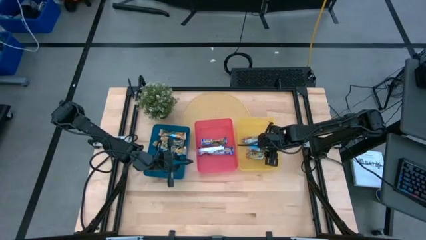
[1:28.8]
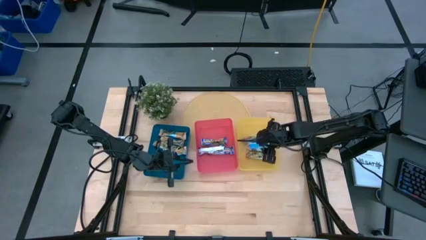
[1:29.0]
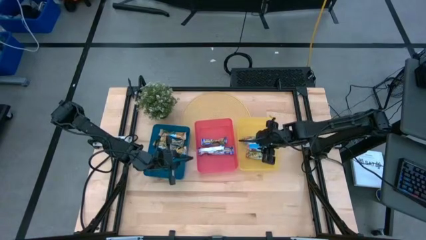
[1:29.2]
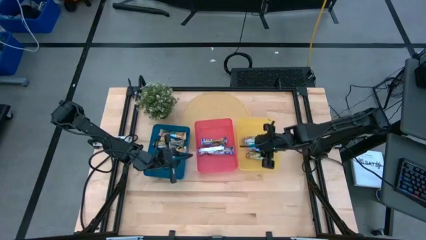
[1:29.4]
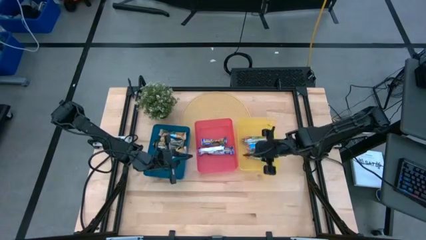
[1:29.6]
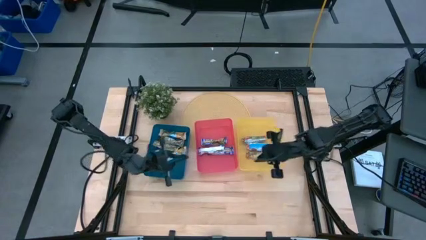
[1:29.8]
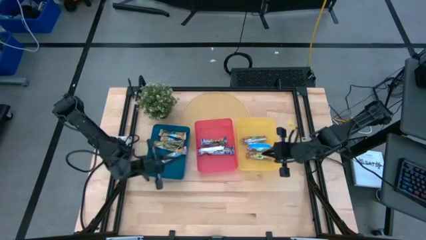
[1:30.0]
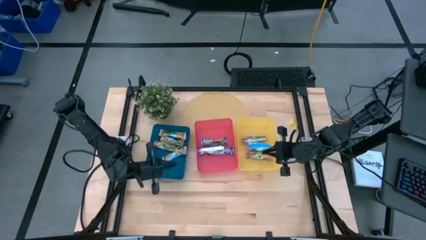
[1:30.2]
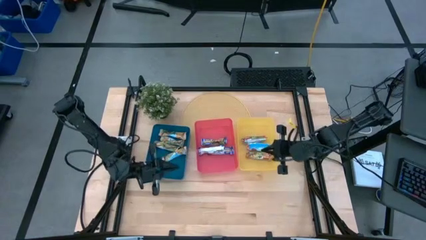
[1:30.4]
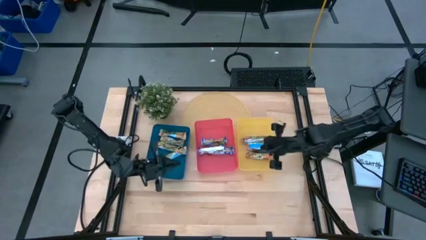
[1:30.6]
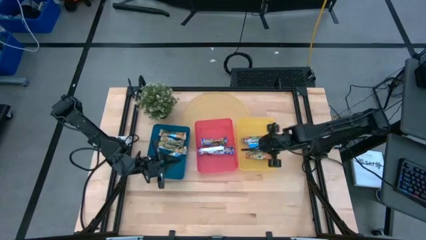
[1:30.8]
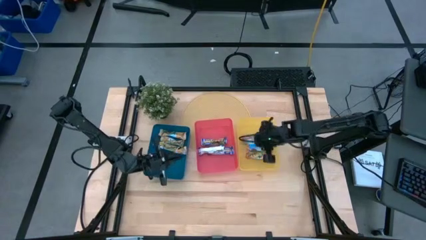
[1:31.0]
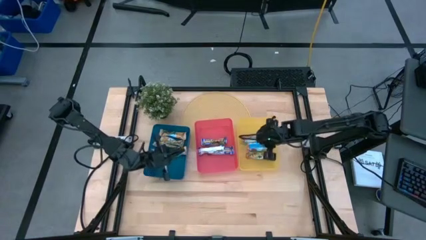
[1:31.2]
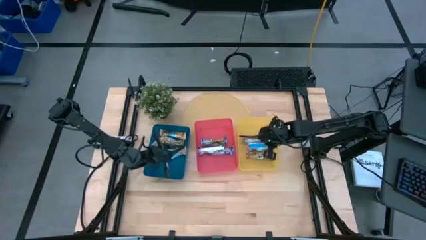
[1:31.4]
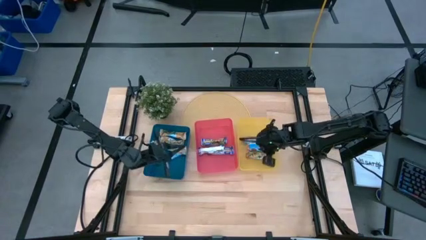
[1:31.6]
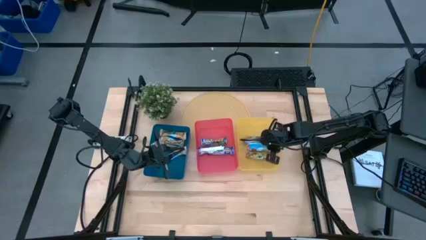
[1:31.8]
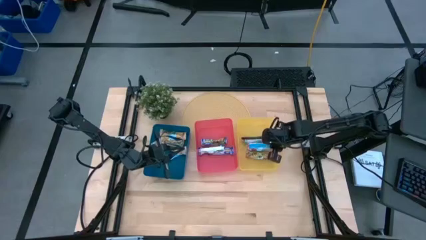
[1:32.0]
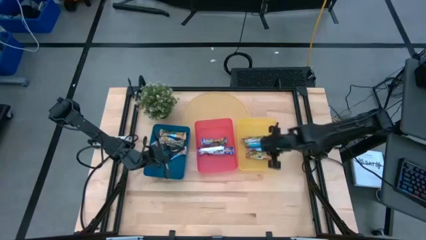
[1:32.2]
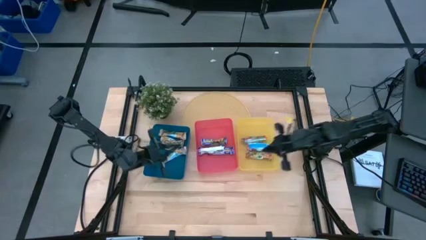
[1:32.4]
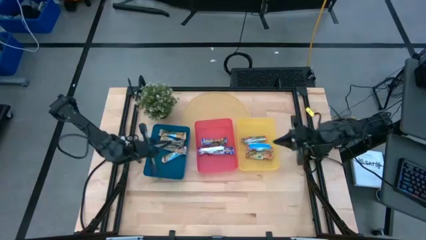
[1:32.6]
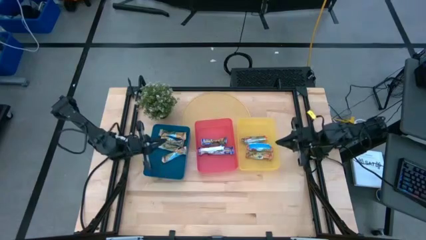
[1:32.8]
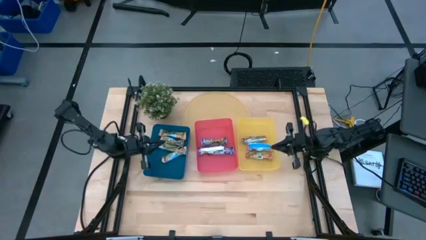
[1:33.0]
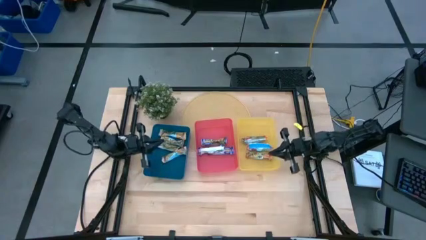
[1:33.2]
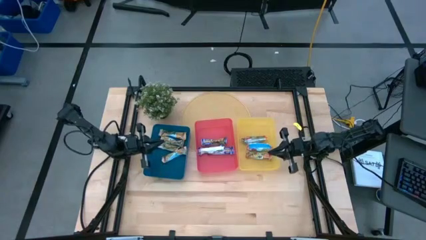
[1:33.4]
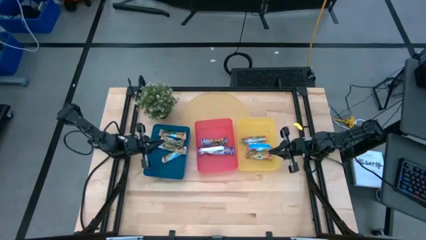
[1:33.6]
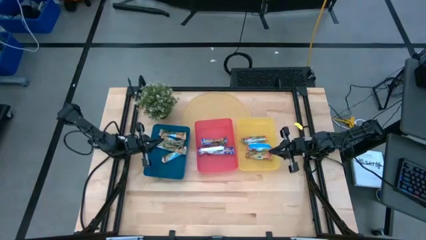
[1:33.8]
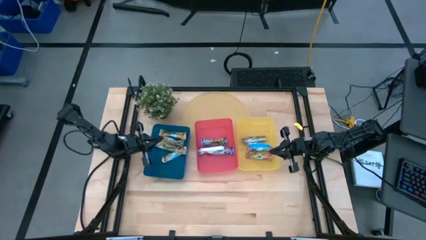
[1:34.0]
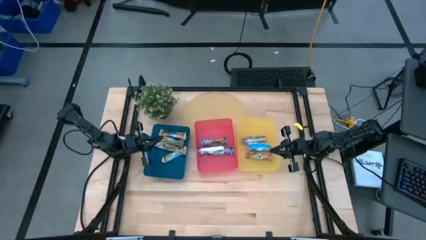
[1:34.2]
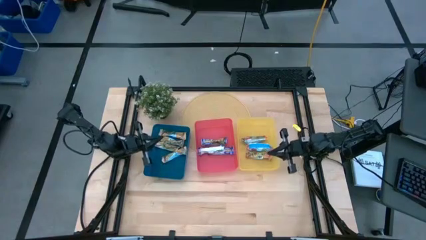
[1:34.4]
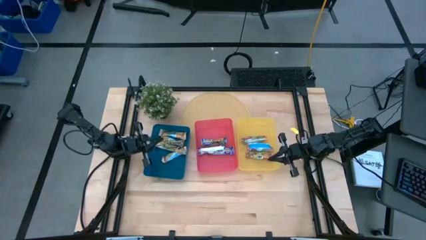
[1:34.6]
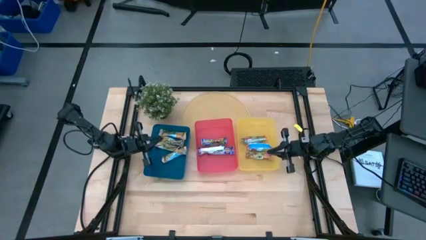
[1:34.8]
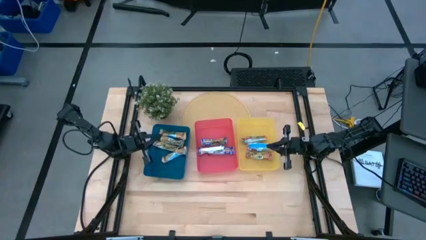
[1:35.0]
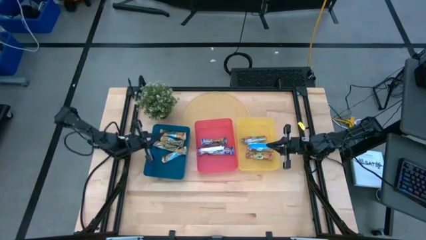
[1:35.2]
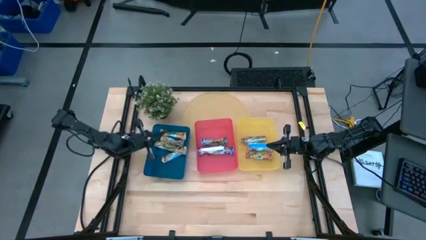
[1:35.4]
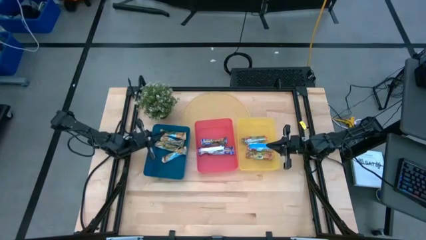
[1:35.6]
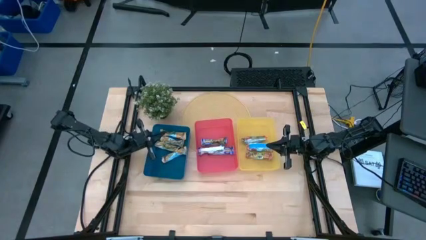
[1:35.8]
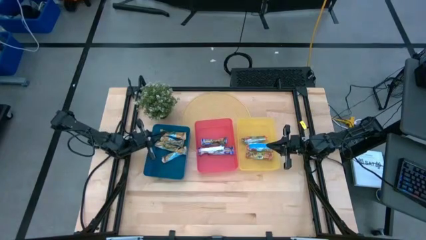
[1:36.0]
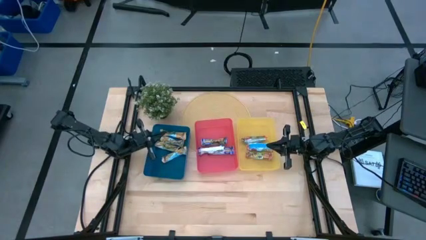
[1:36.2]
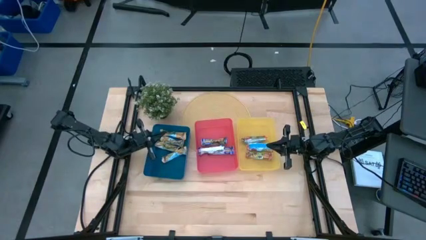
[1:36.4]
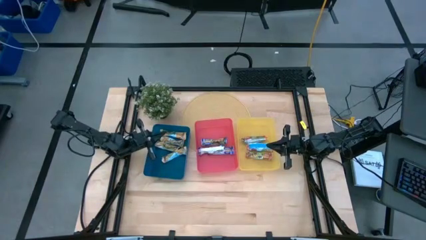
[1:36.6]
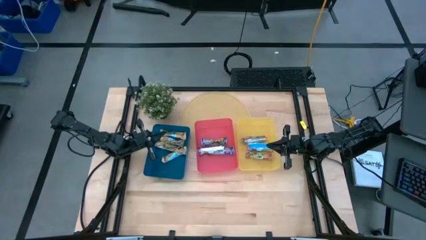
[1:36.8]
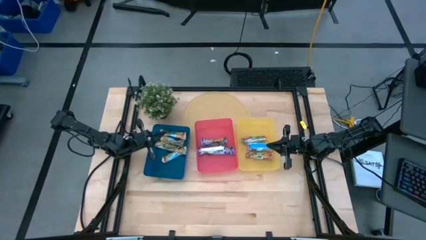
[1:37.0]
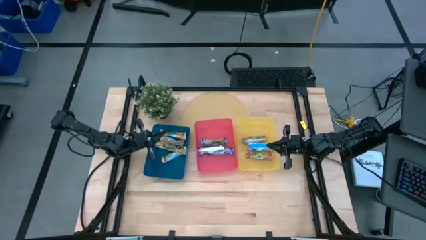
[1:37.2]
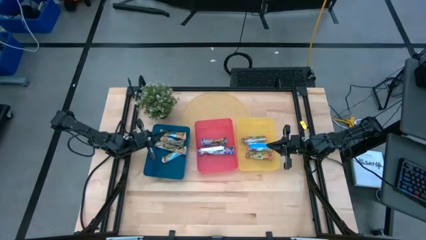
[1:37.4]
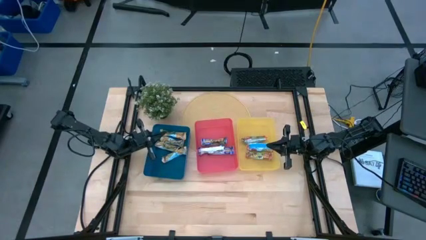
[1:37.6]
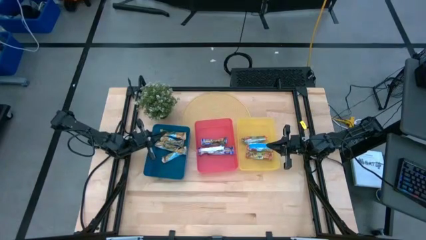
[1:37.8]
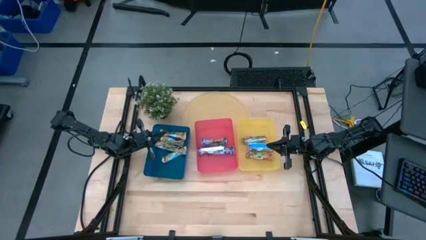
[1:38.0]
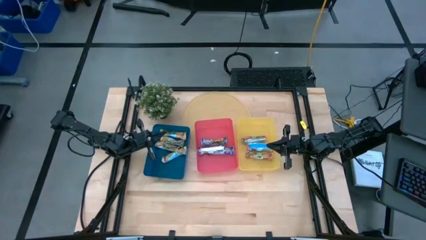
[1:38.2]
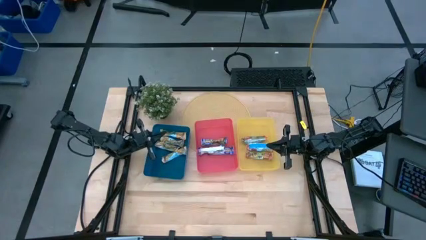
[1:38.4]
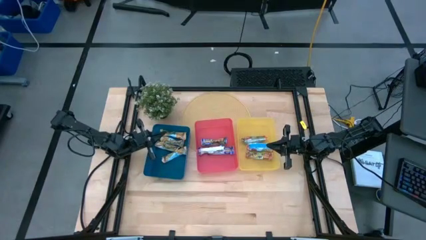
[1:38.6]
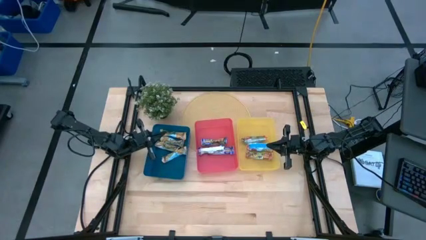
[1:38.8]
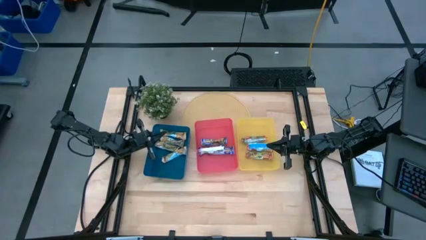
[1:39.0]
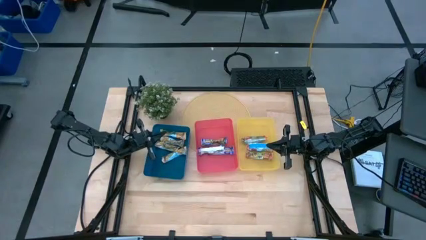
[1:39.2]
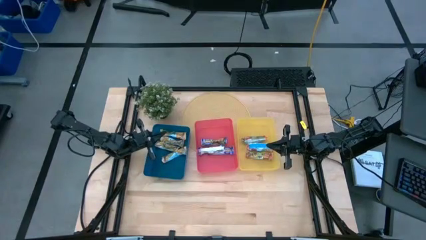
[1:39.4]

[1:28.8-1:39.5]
Task: Pick and place Granola Bars by type
Return to Home Position

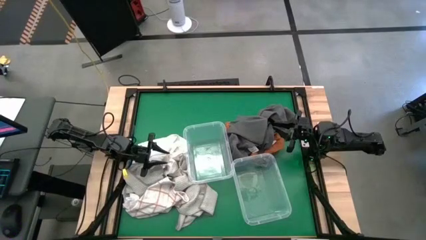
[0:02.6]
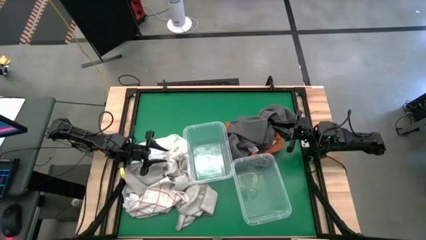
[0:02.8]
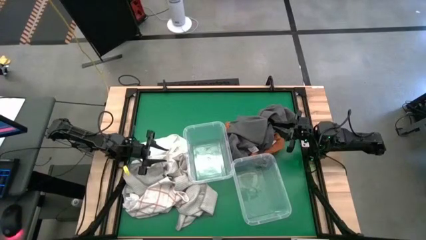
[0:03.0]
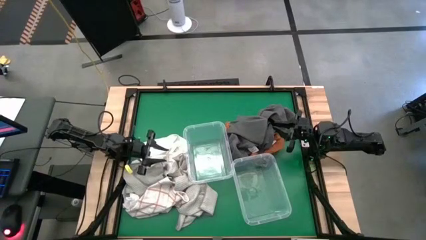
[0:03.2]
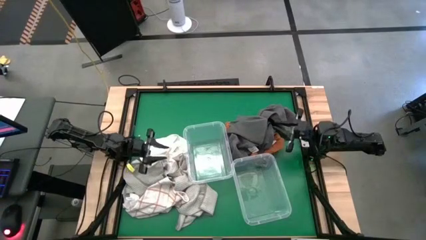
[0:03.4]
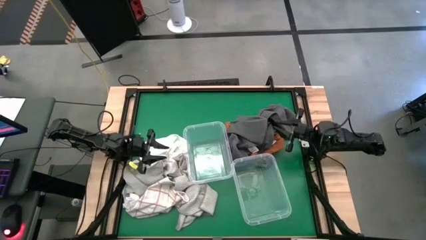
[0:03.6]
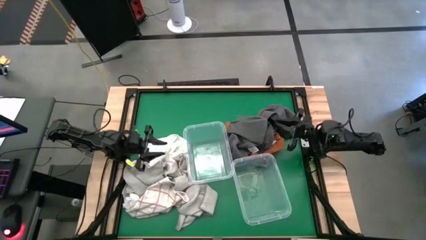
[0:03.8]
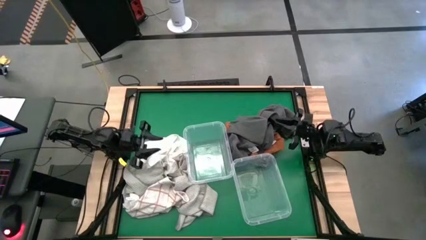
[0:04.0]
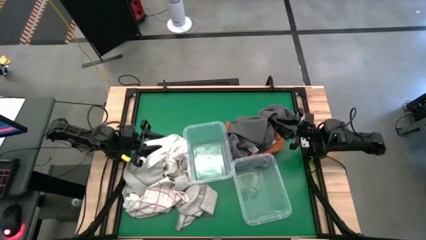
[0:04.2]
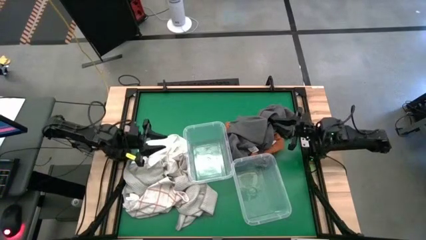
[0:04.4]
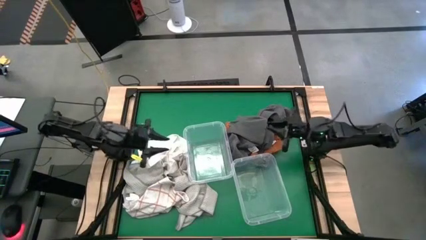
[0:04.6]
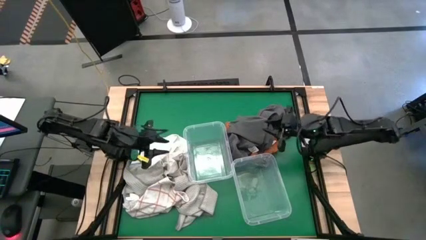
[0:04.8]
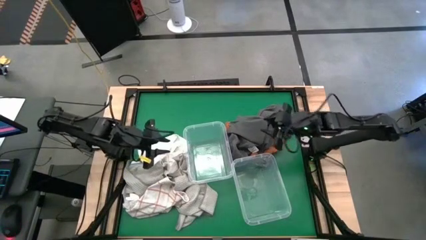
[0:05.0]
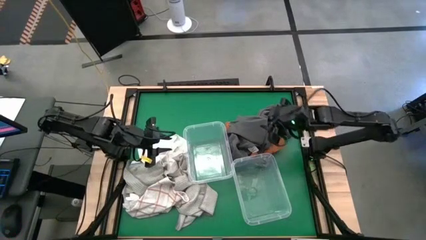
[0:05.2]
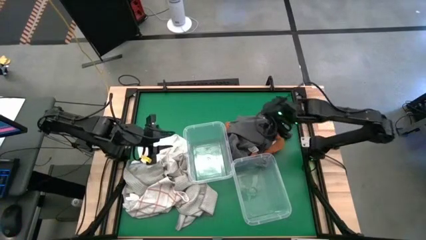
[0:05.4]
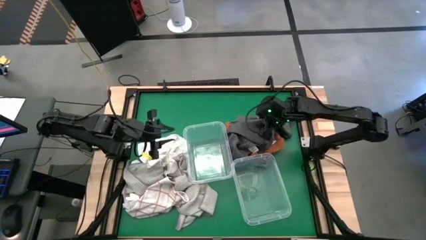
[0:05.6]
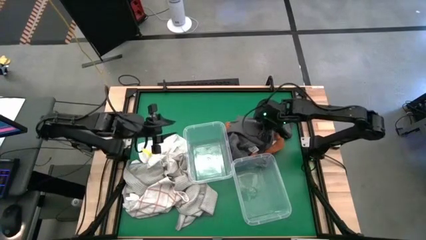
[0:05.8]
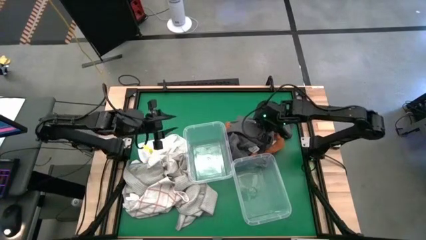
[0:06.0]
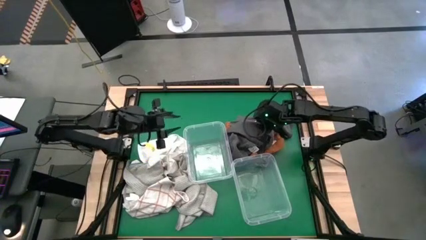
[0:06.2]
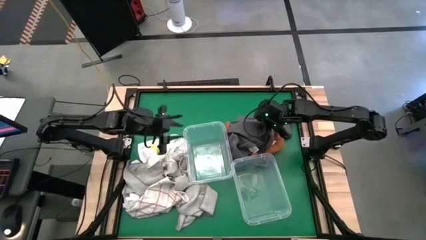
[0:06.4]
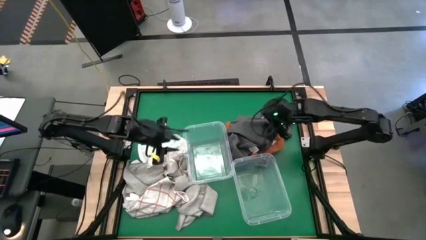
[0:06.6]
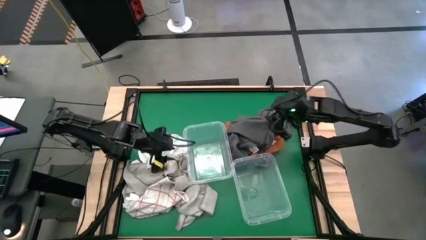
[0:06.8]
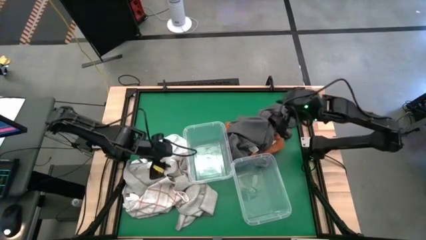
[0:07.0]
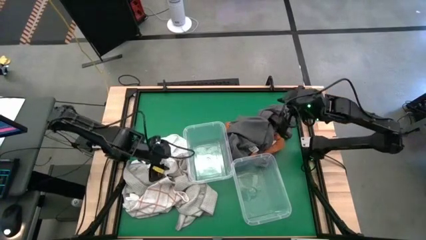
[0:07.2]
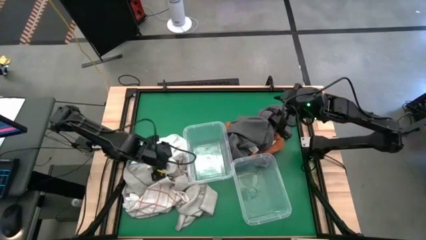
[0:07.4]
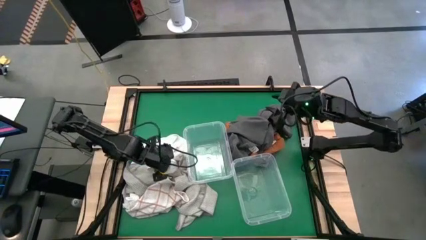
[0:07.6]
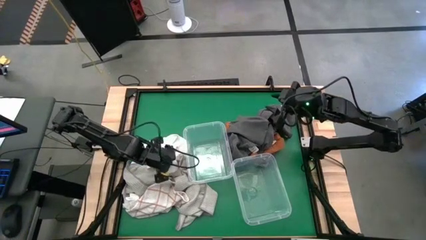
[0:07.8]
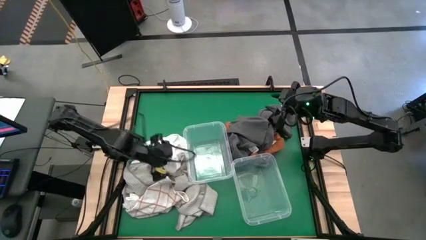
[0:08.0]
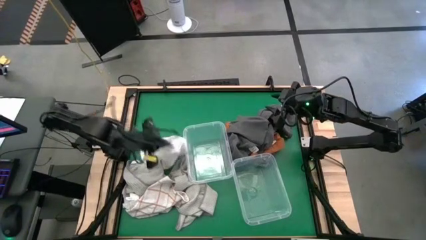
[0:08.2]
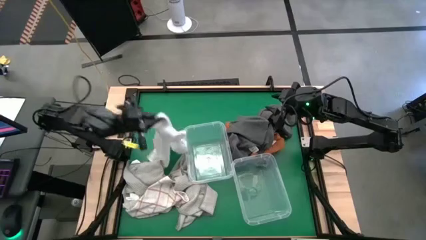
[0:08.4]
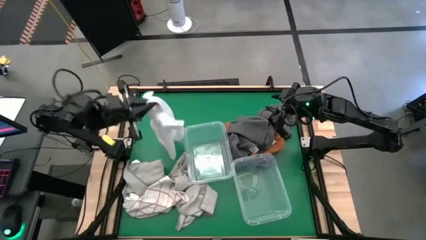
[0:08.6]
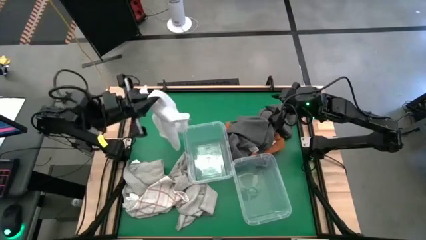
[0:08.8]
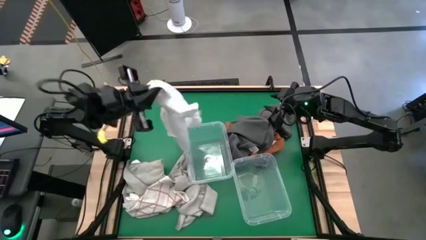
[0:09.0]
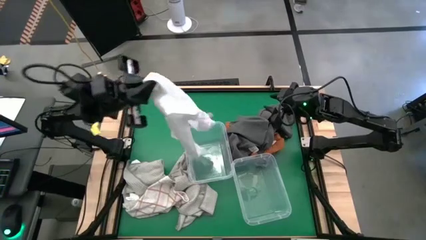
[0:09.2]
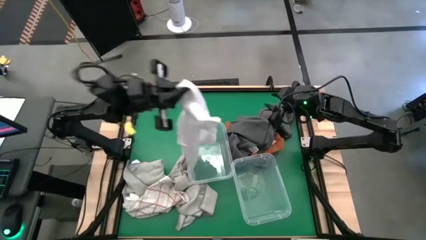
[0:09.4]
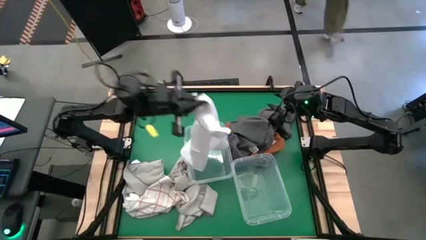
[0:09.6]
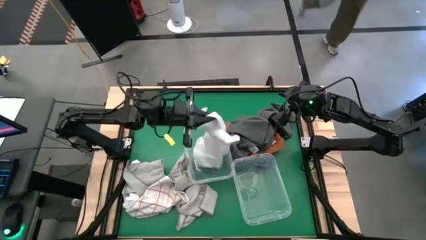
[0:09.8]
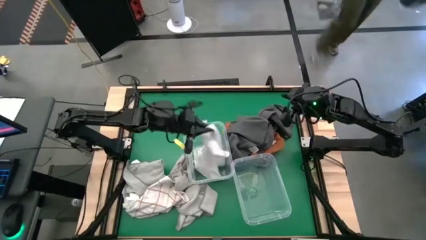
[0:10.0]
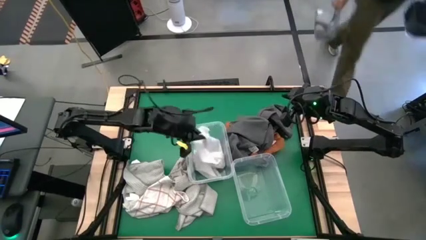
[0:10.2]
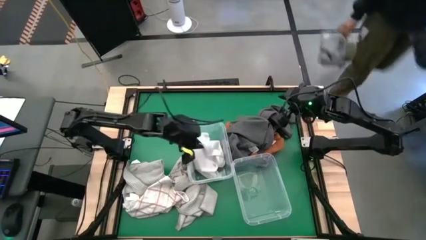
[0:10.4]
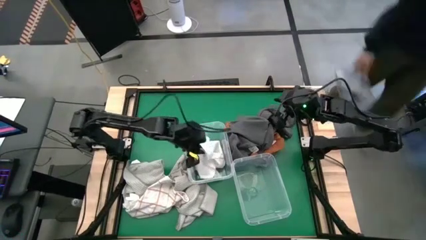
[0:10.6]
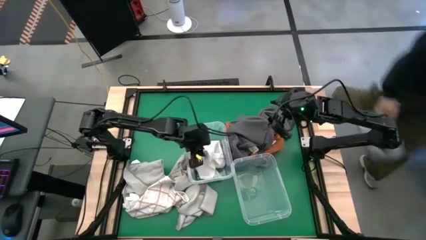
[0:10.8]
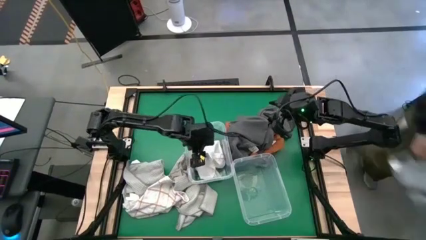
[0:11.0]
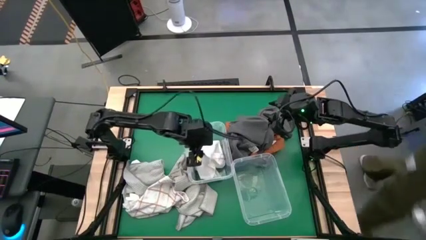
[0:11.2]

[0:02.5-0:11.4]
Task: Sort microfiber towel by color & place in baskets
Put the white microfiber towel into the left transparent bin
